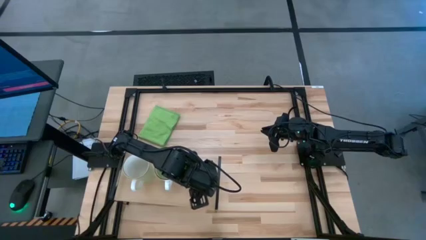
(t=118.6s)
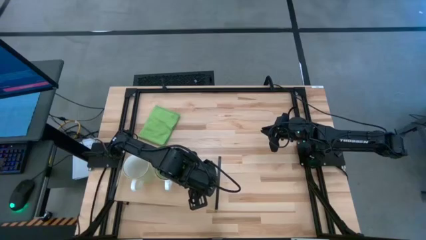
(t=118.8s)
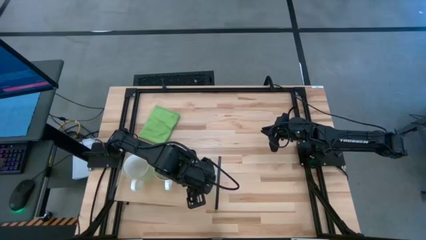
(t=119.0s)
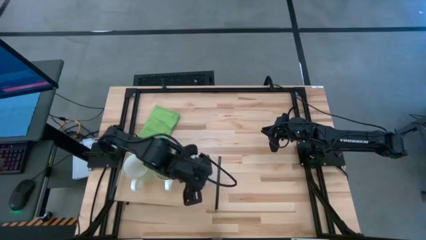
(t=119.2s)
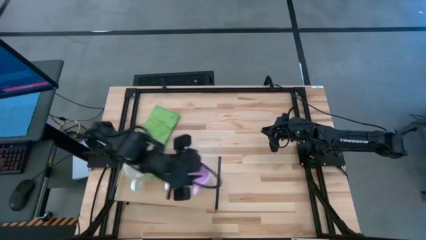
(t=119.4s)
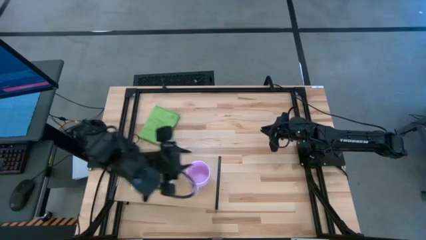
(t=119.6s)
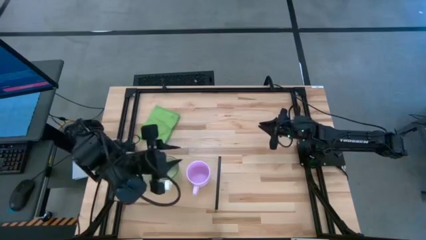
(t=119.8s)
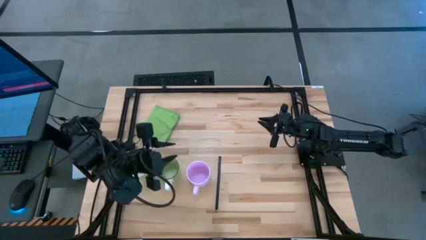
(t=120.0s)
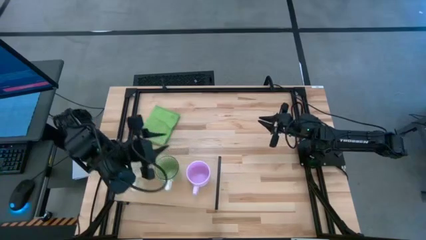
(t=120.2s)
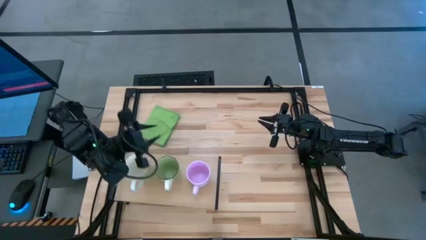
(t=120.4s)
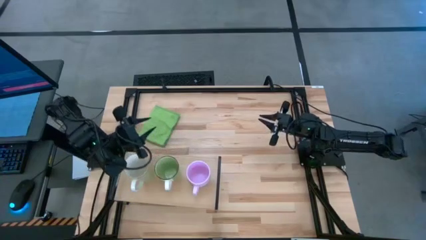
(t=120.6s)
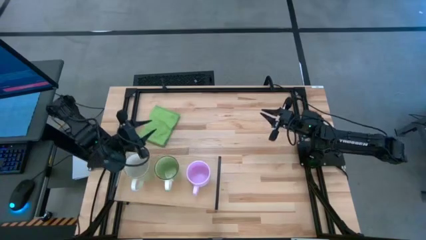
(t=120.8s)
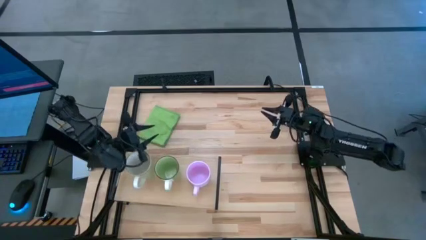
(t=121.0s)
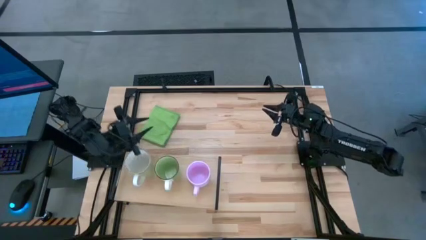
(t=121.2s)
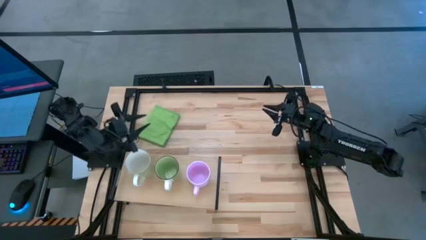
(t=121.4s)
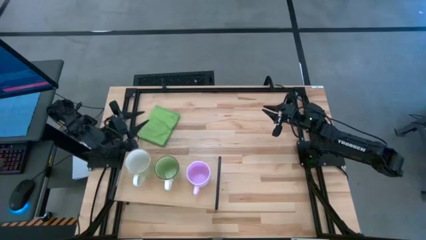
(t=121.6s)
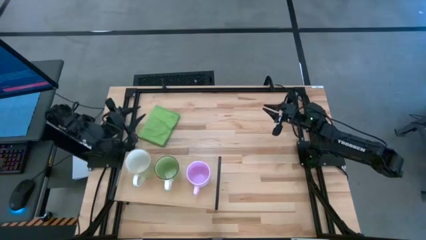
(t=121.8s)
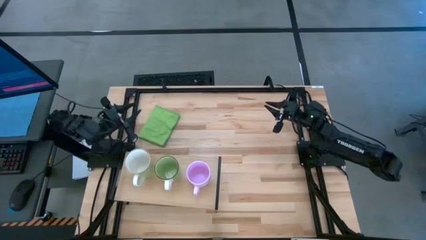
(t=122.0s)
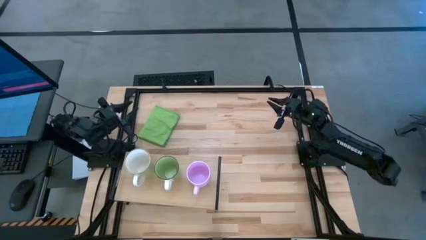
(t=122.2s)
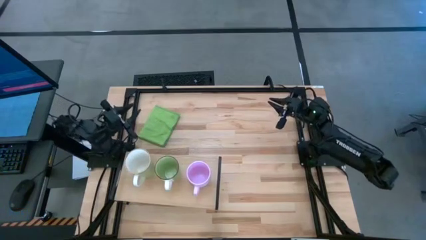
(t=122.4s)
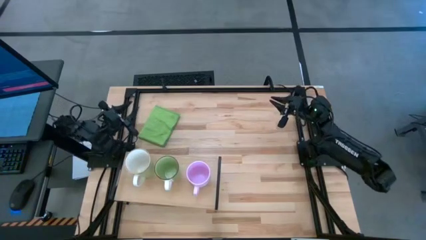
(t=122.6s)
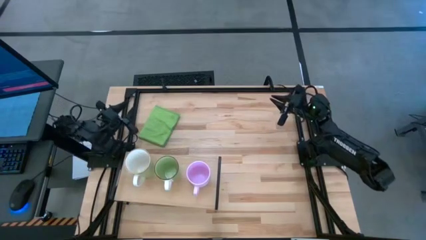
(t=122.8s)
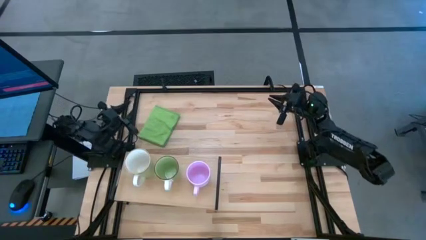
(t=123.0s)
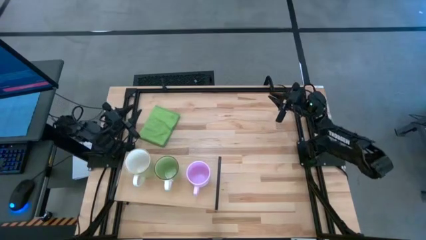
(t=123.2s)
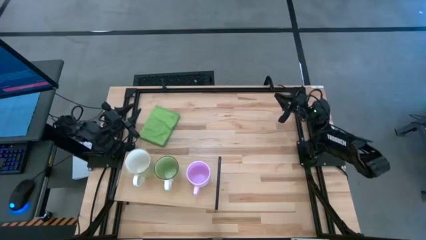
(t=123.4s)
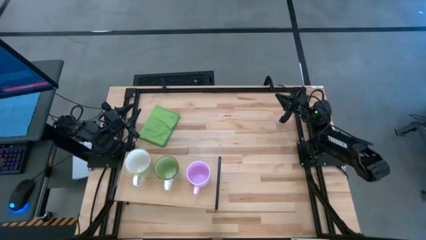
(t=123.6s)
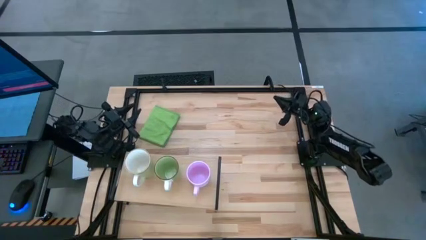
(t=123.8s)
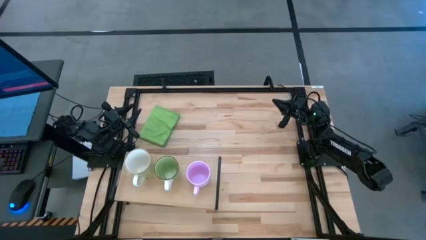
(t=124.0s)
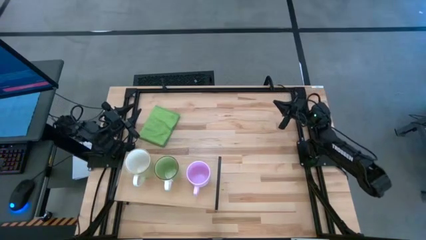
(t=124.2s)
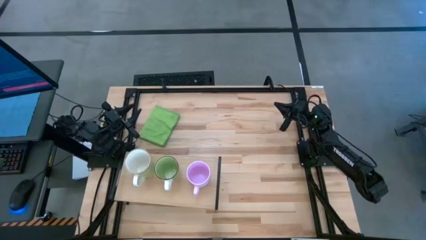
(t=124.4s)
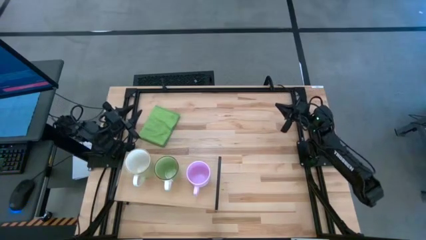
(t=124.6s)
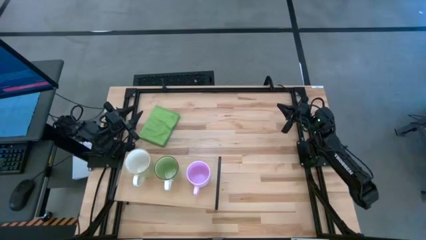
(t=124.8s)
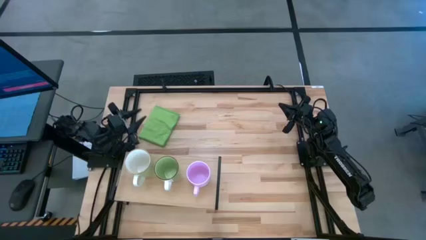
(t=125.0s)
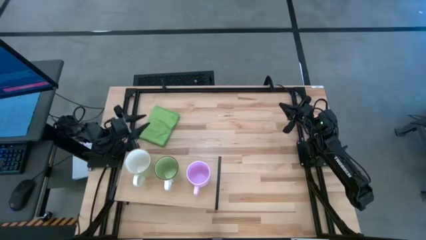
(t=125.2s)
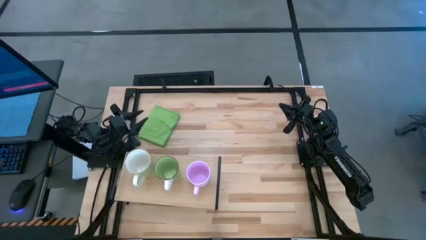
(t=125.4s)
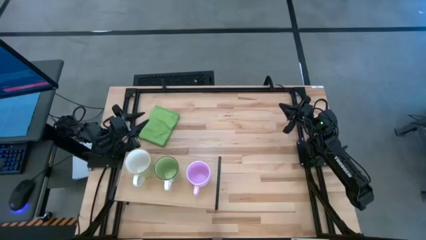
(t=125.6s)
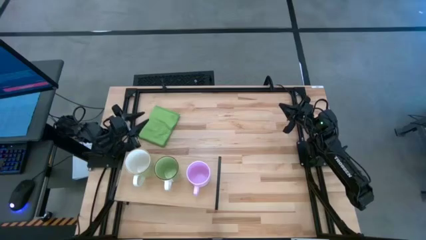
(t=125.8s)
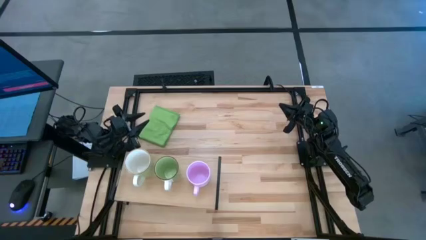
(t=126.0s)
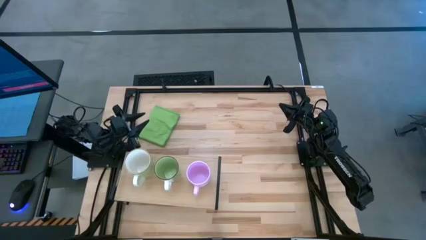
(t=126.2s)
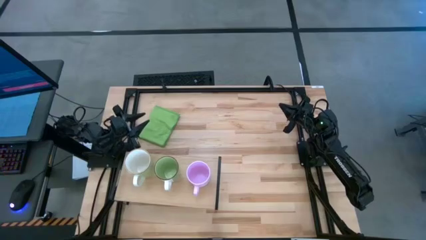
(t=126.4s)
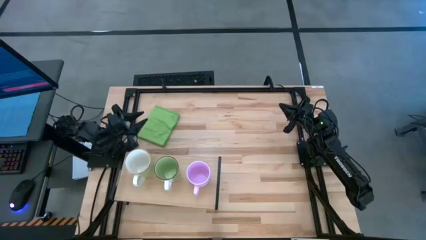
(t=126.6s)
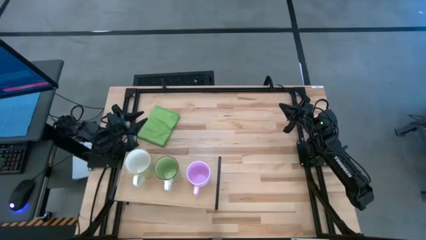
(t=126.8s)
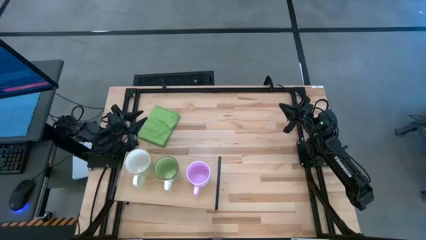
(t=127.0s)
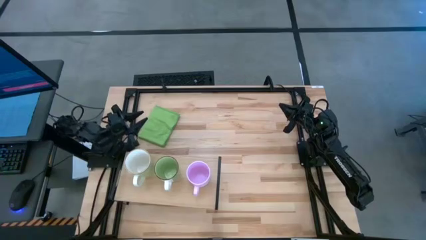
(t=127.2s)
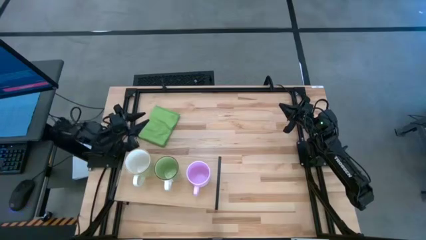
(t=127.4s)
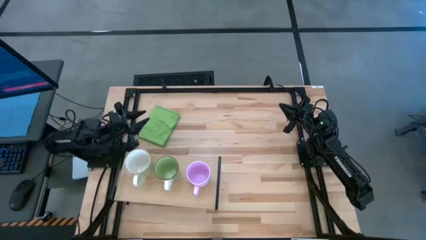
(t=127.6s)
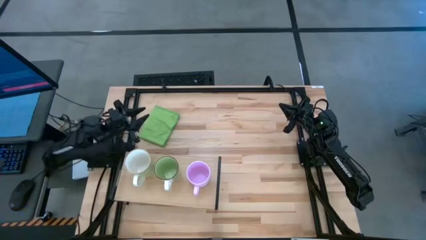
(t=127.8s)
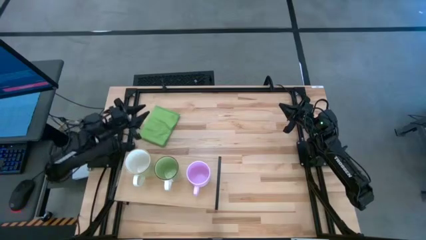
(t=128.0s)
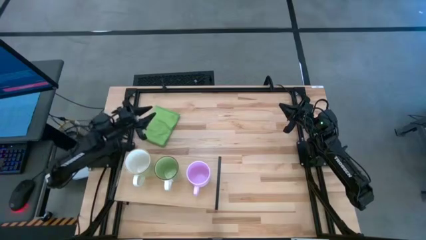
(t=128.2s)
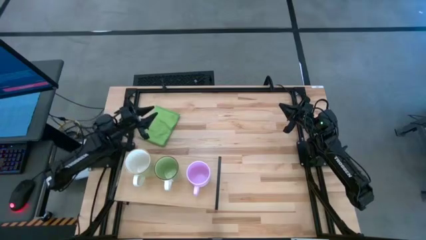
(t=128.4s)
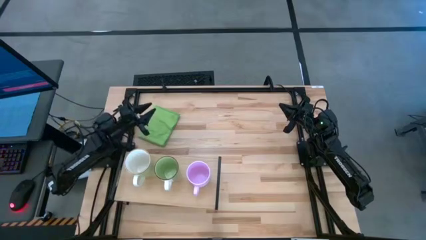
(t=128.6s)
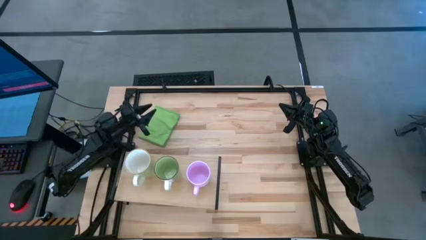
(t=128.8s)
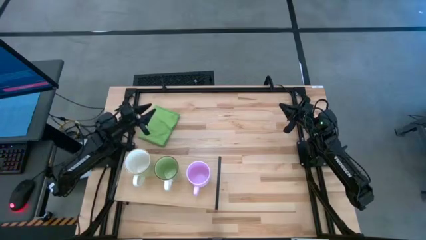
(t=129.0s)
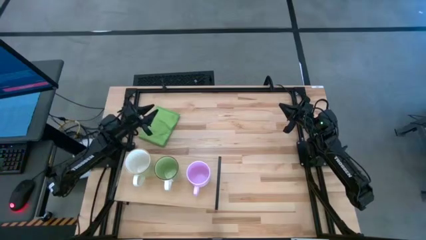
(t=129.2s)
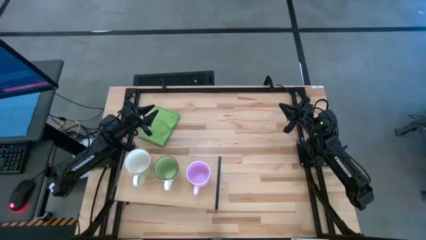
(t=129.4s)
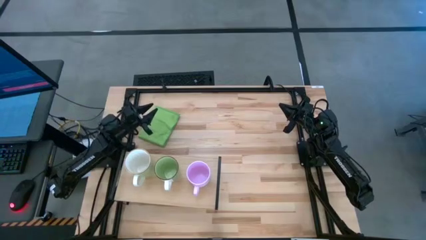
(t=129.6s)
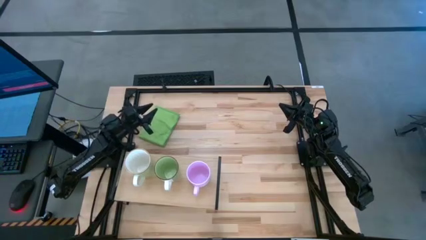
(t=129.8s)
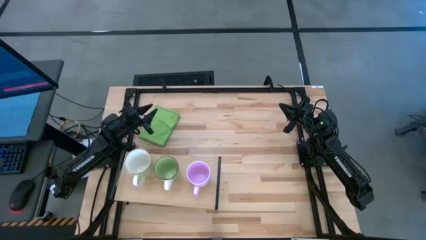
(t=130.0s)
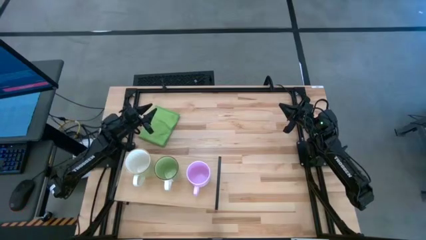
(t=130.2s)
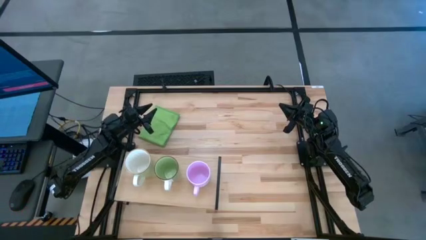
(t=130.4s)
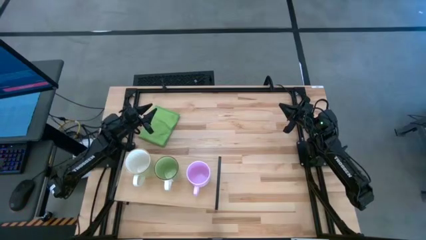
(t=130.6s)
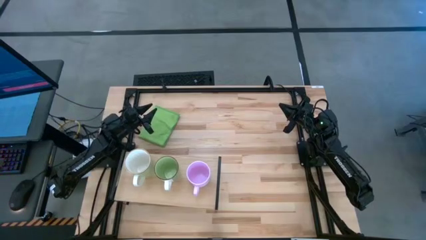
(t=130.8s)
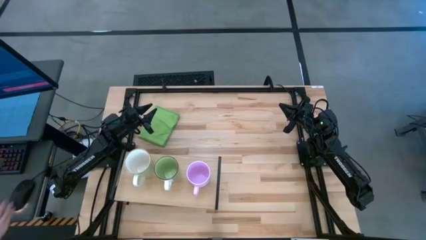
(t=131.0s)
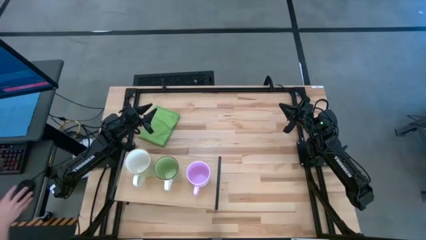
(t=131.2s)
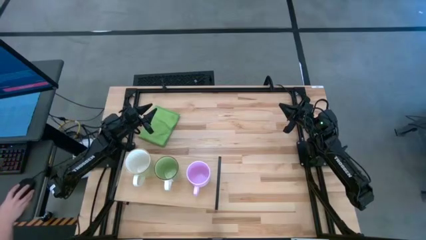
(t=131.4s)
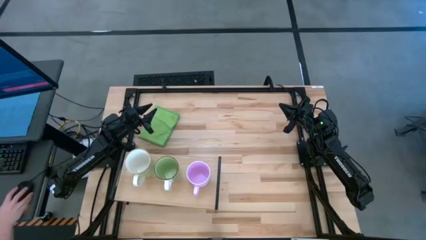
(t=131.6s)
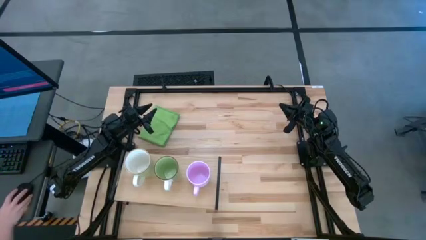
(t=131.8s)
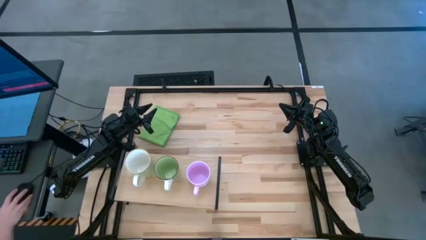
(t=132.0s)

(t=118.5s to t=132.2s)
Task: Stack small to large cups/mugs on shelf
Return to Home Position

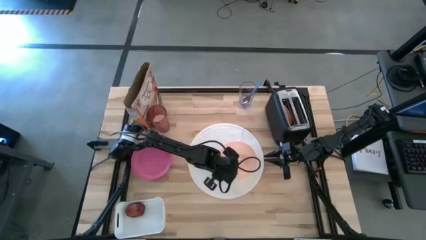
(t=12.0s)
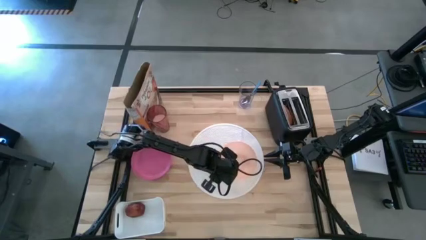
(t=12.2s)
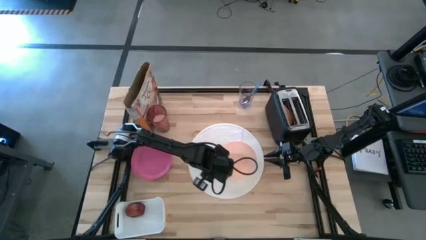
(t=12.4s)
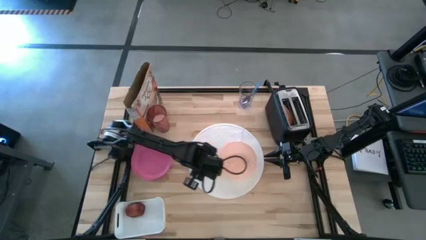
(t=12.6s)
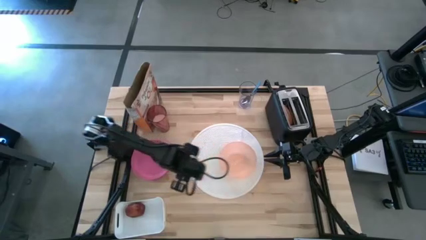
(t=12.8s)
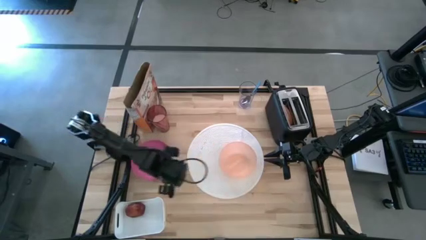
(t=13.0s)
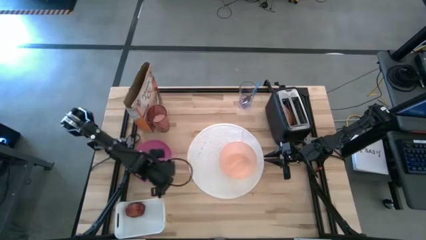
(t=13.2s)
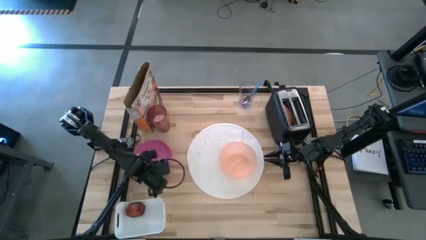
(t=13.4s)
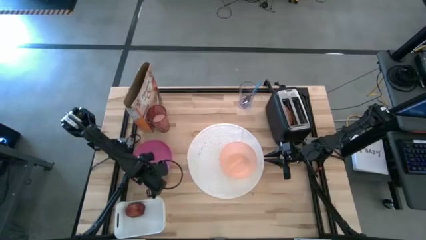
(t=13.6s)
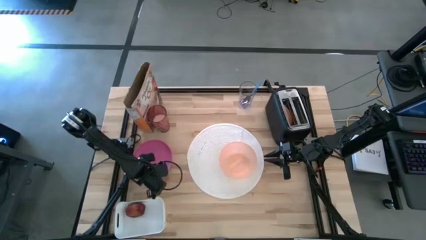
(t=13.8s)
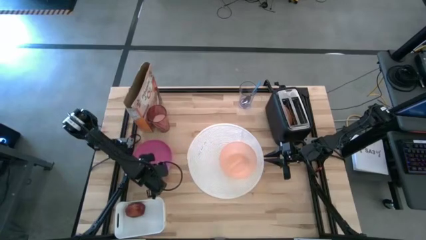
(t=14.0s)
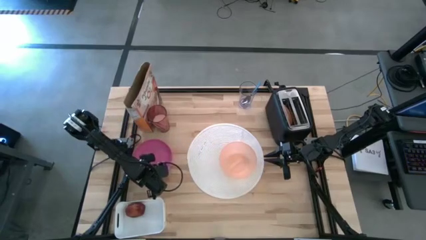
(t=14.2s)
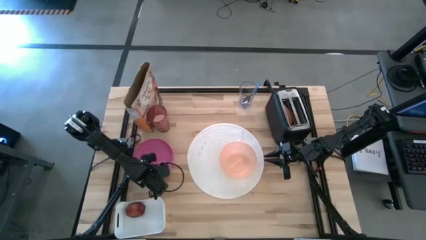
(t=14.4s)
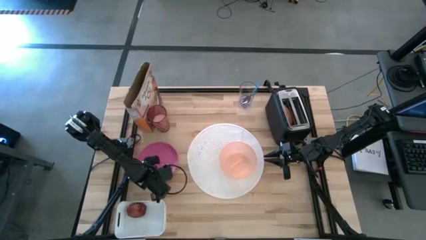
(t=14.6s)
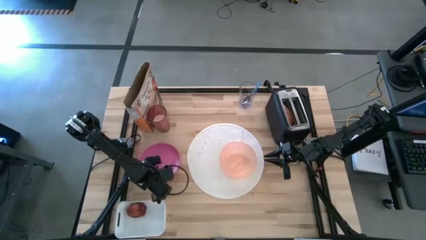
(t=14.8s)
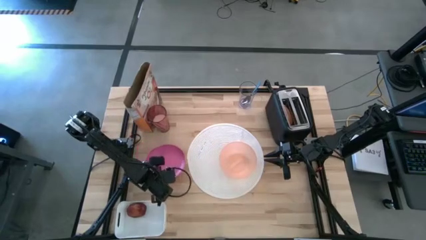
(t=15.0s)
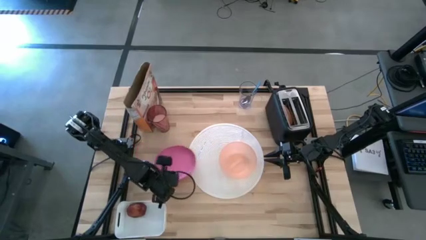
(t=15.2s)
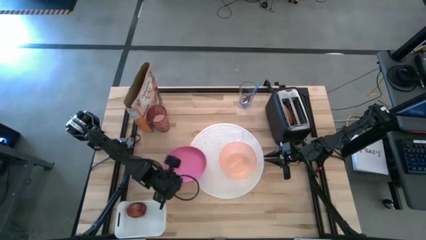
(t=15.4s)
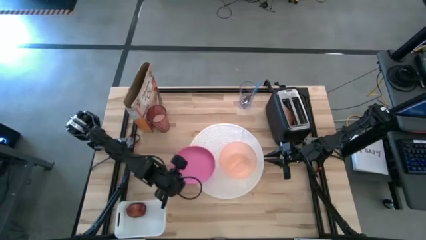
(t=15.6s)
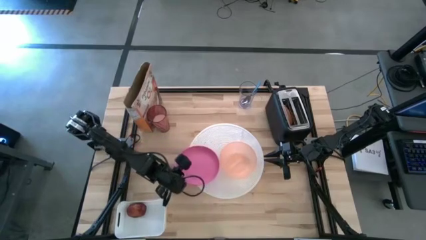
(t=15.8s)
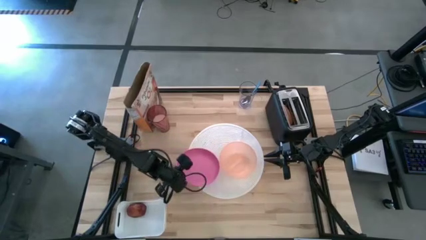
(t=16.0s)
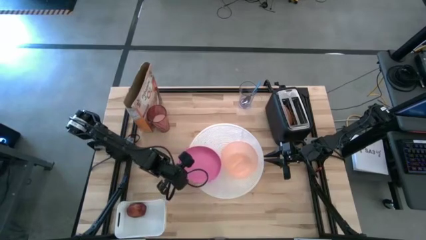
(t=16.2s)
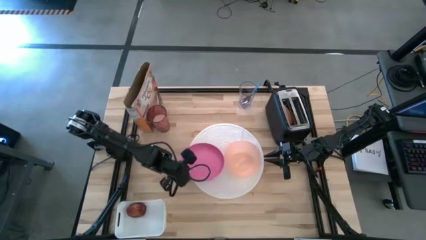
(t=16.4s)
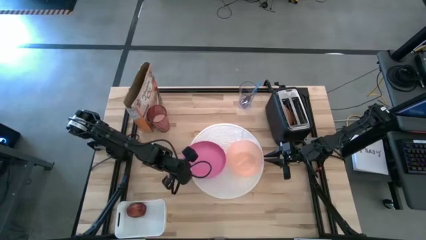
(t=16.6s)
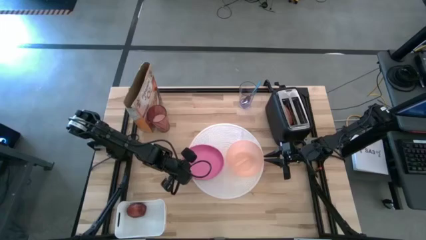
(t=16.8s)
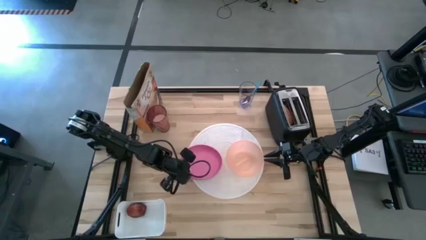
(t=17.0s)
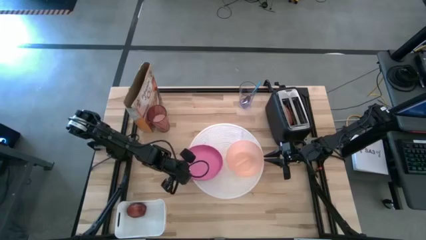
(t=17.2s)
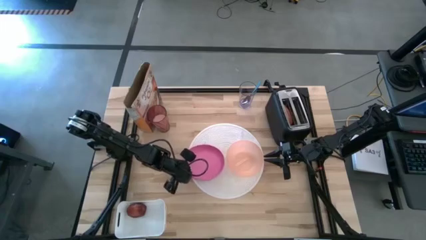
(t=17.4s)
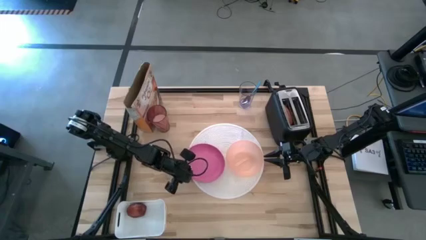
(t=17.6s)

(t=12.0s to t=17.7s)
Task: Arrange a breakfast setting
Put the pink plate on the white table mat
